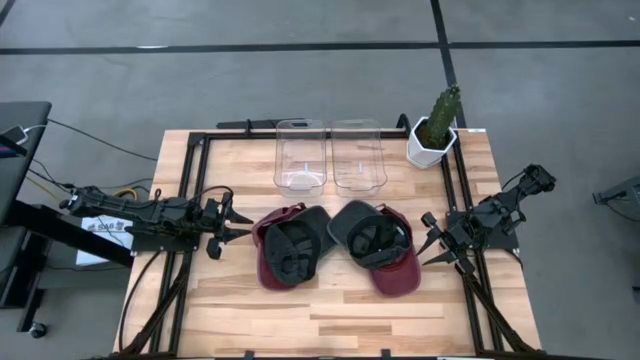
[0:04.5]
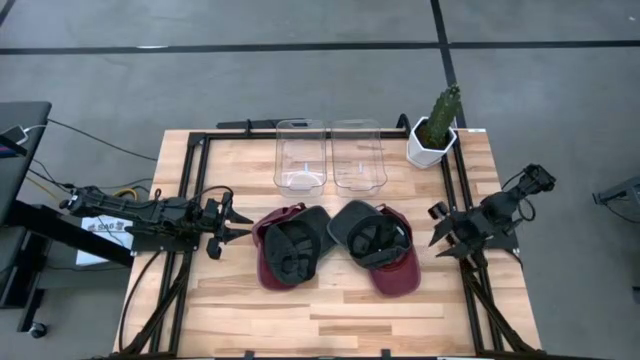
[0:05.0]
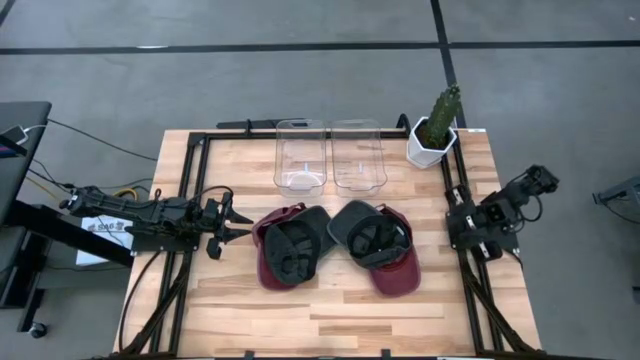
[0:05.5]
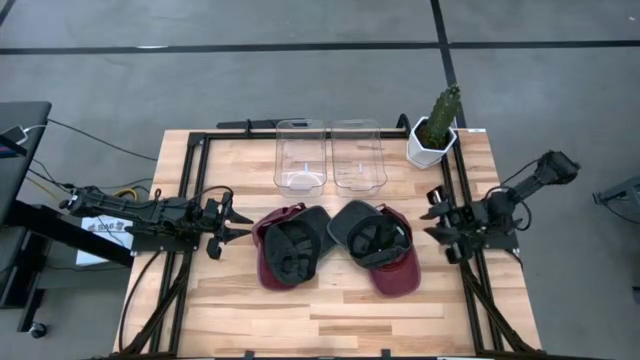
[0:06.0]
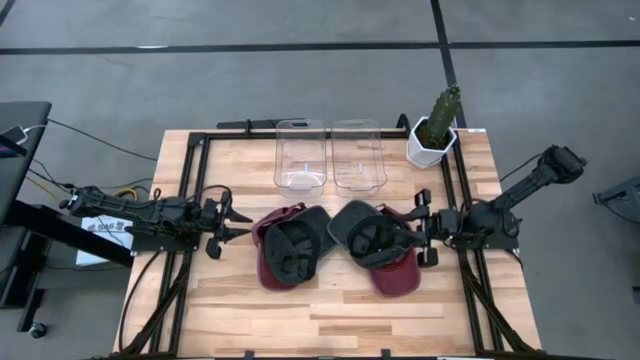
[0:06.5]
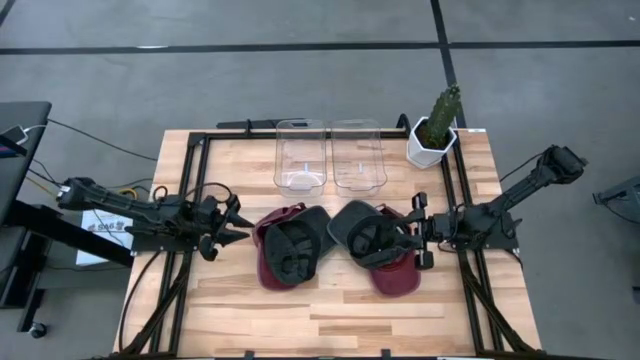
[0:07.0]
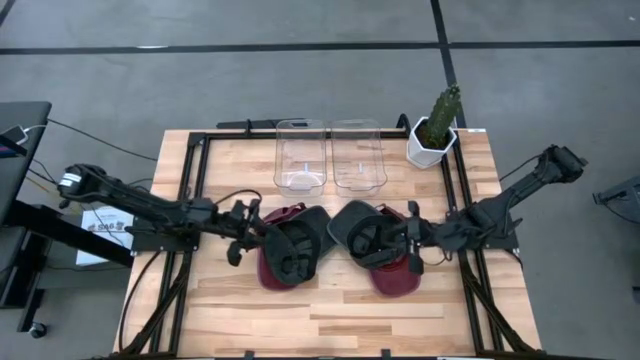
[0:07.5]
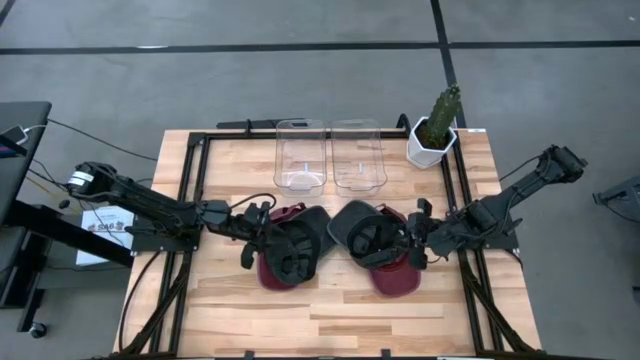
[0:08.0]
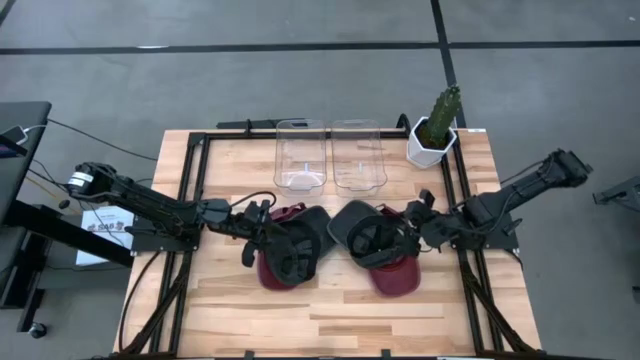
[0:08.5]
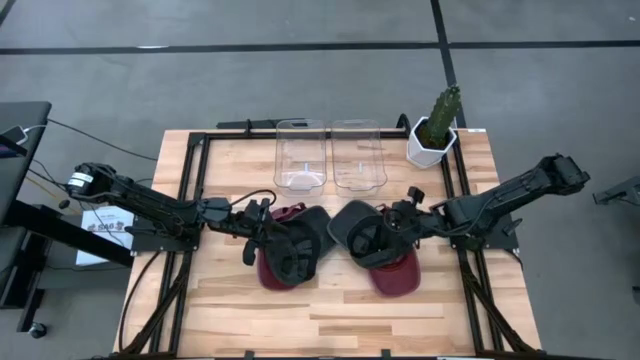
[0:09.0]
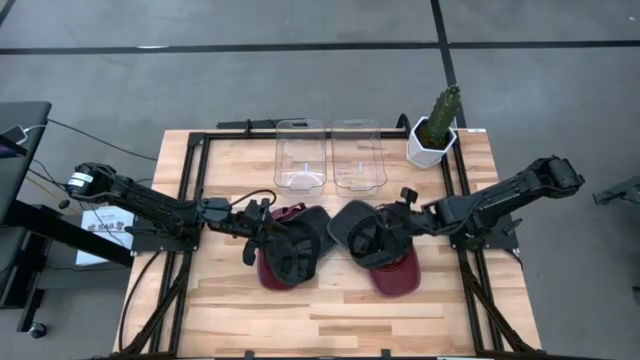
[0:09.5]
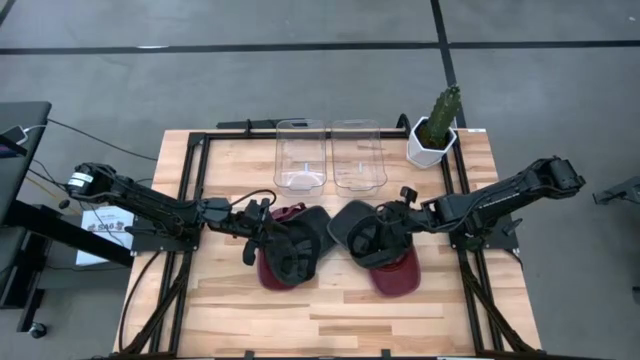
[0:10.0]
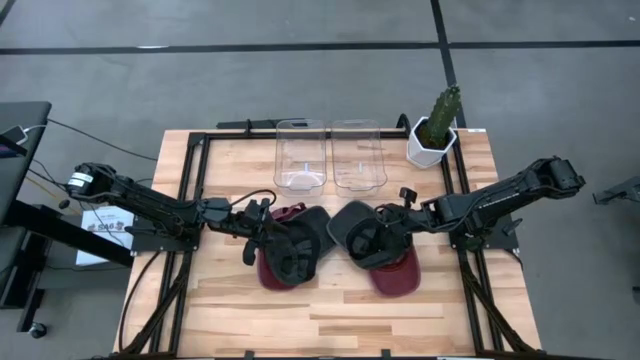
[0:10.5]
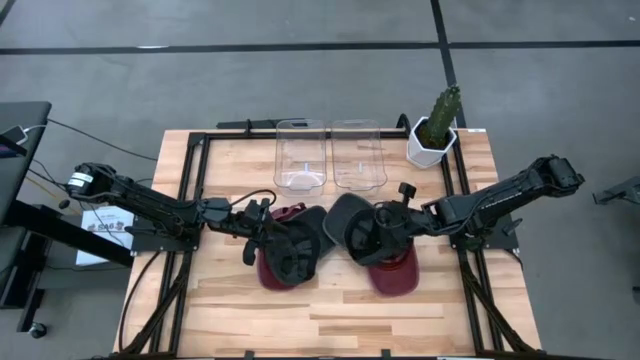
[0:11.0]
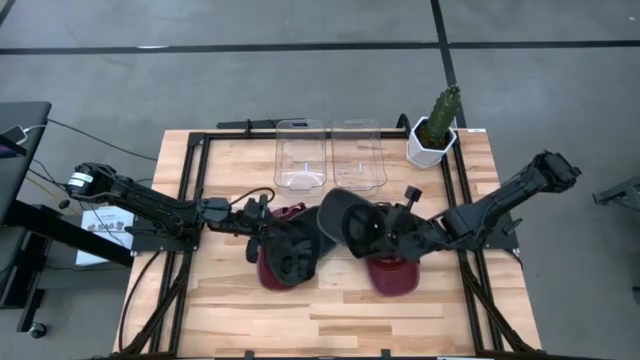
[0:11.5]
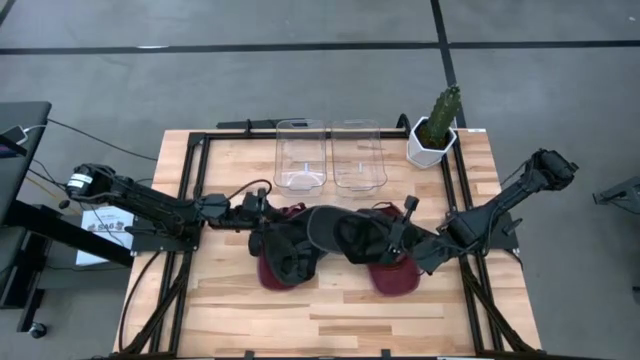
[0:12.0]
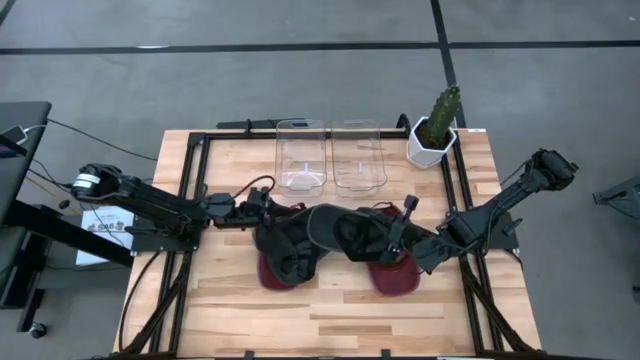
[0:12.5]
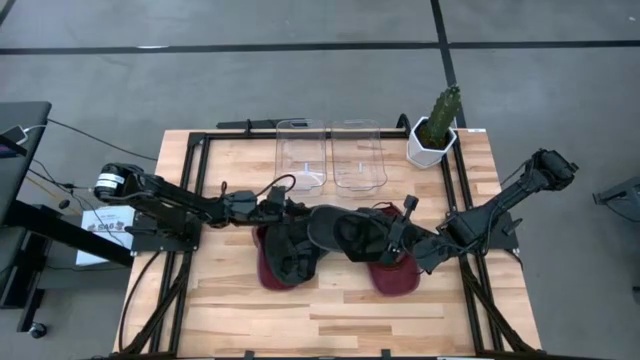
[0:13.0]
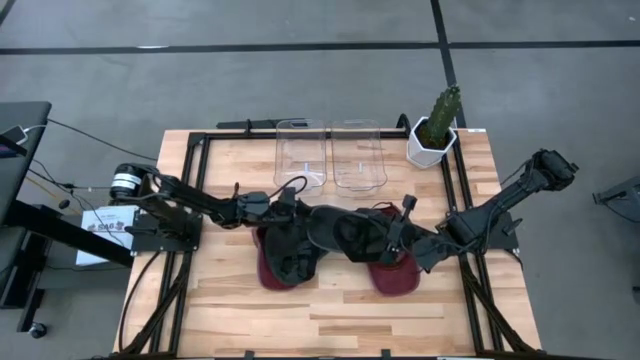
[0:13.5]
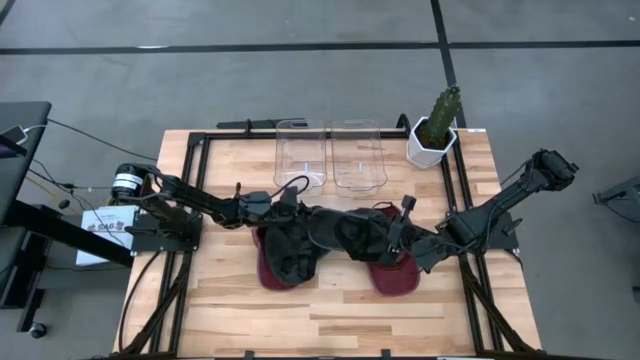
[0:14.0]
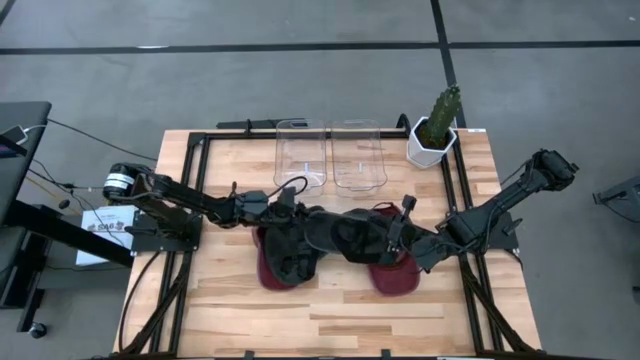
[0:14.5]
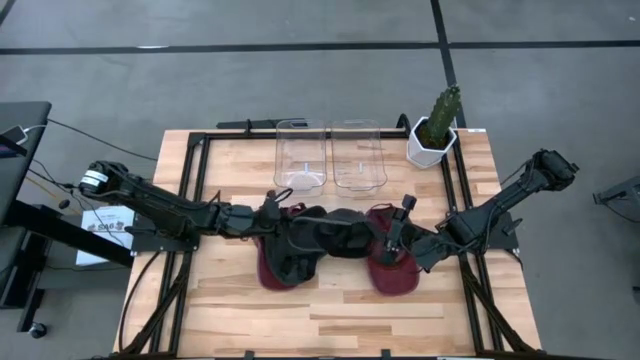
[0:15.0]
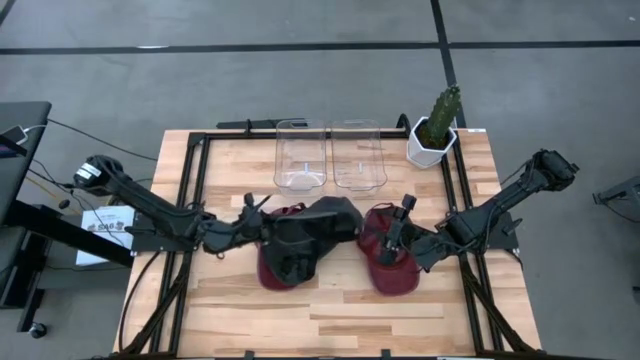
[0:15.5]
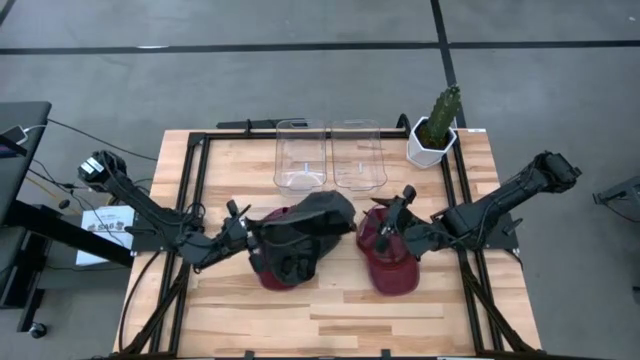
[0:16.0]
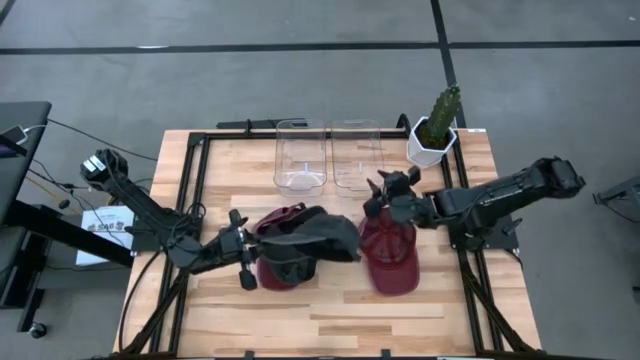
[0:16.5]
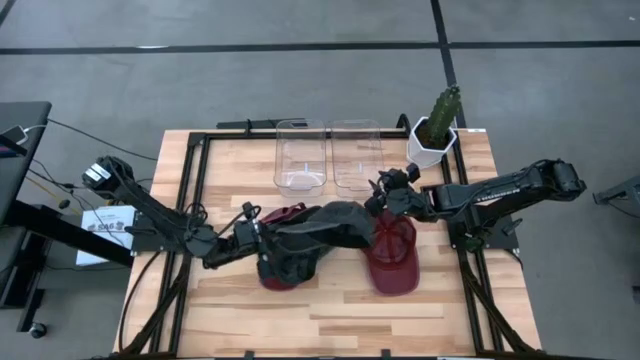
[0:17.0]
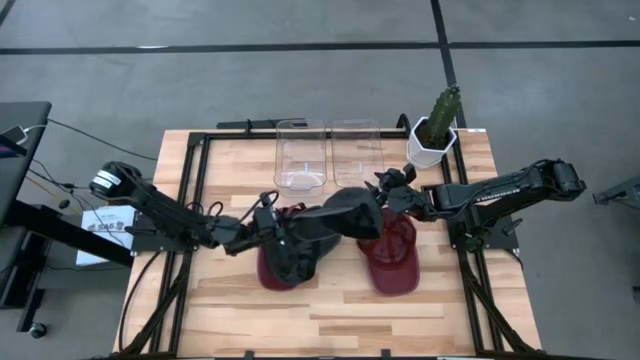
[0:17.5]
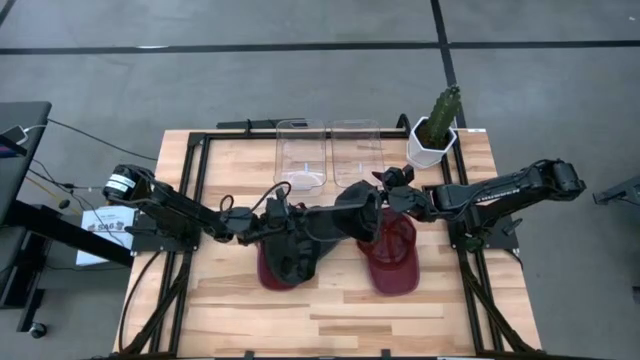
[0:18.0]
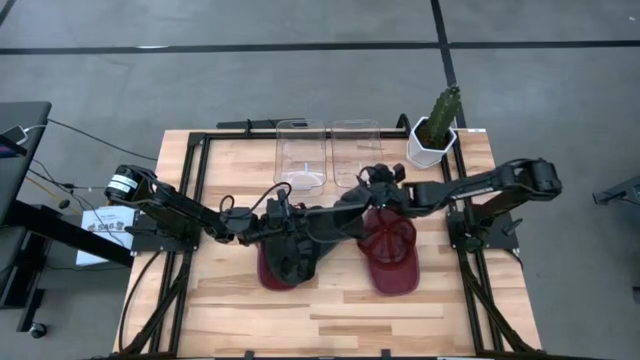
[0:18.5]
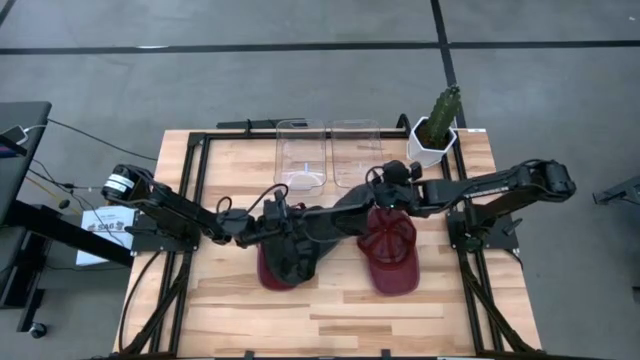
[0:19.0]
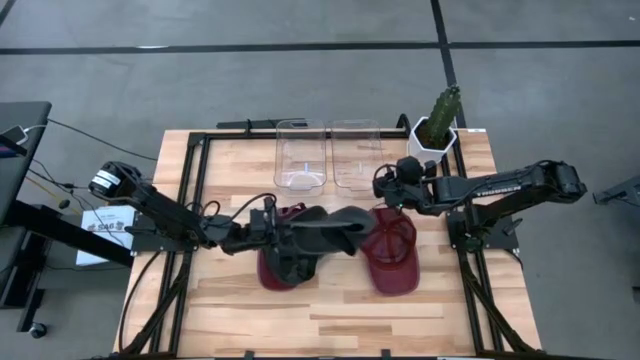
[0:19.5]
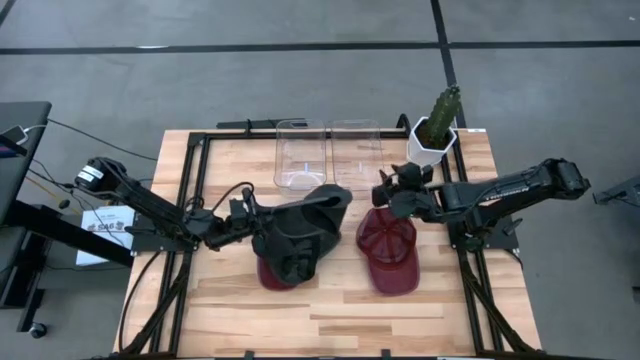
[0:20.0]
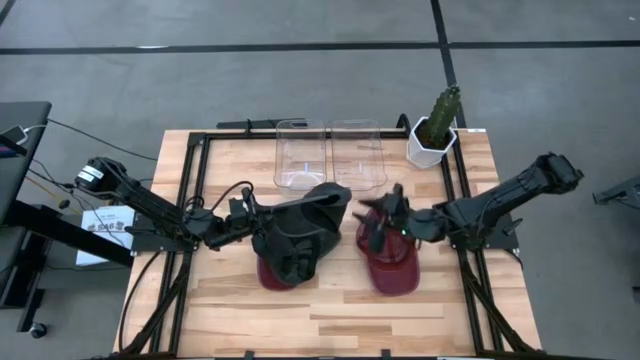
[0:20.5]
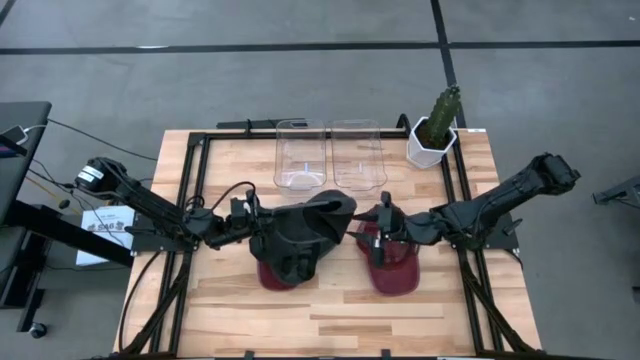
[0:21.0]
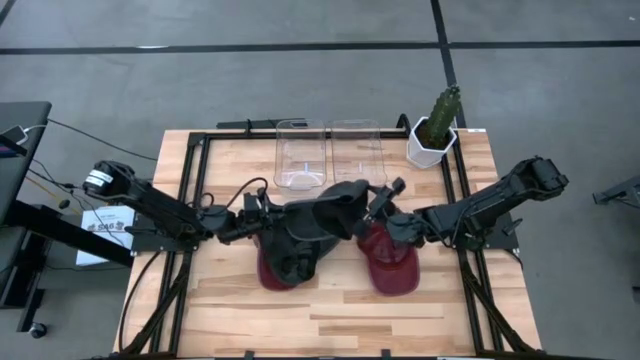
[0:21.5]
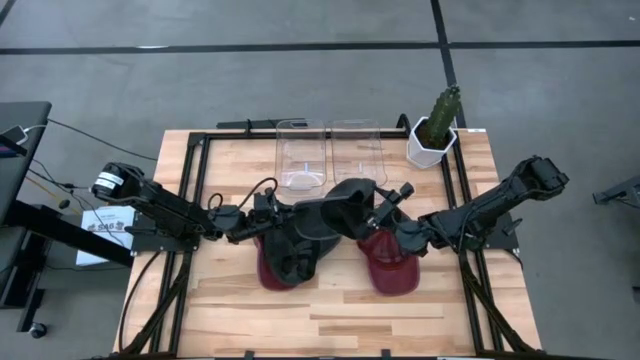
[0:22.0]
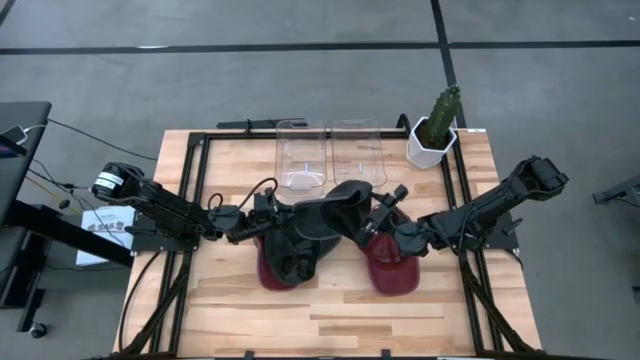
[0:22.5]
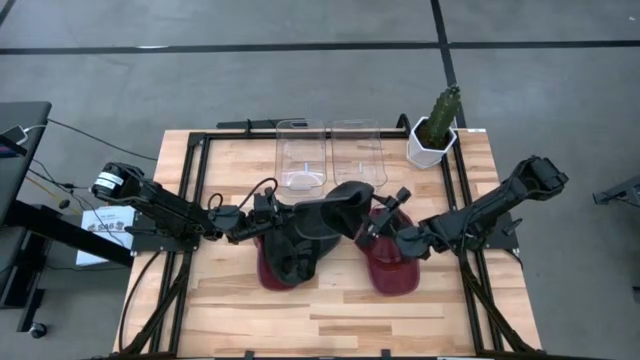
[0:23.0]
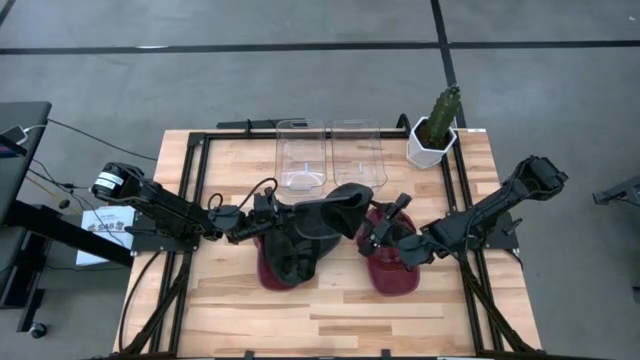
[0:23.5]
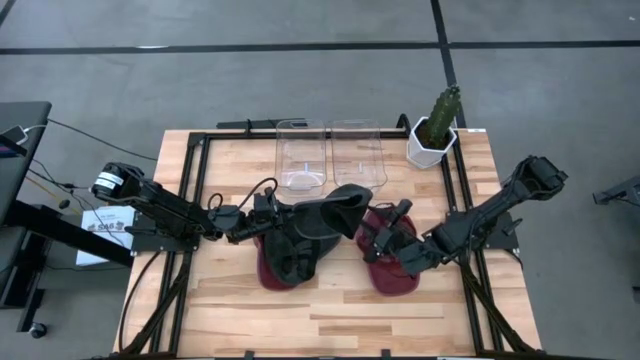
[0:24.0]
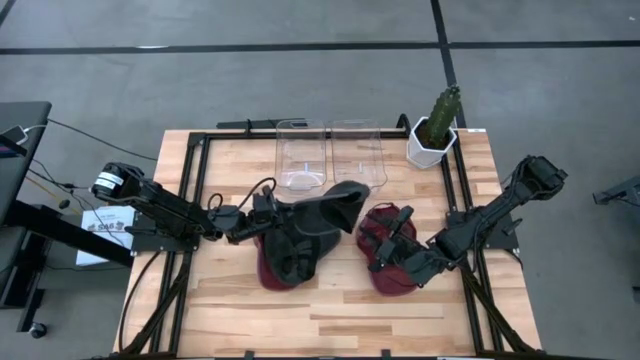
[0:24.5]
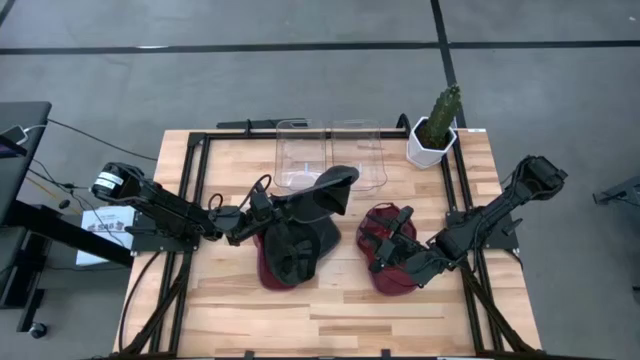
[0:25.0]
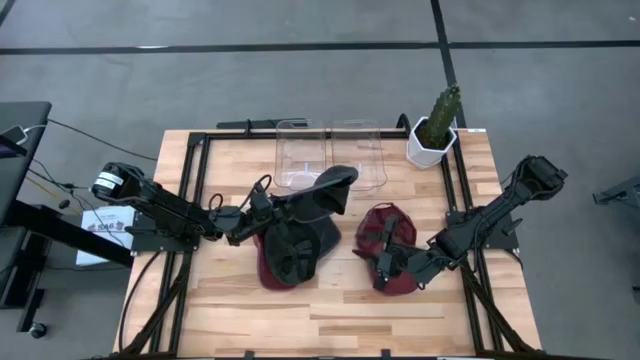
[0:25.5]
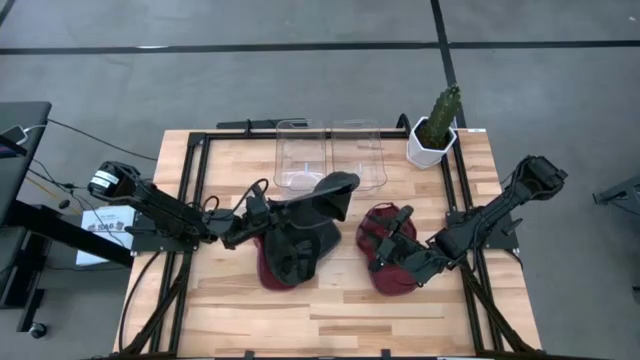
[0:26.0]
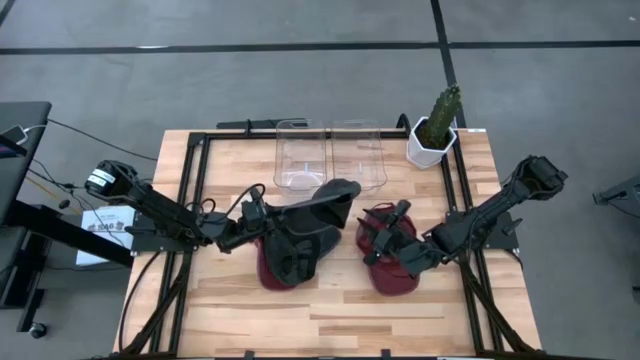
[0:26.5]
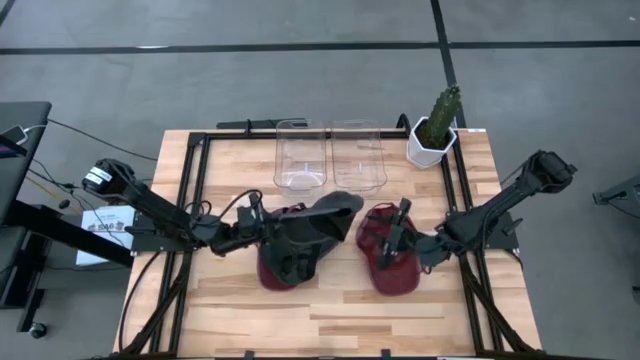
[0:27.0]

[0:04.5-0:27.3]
Task: Pick & Place hat
Put the black cap into the right transparent bin
